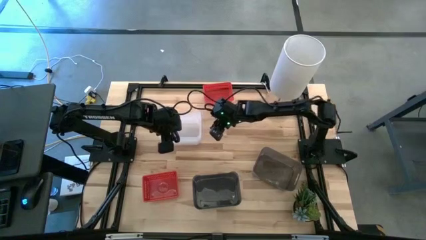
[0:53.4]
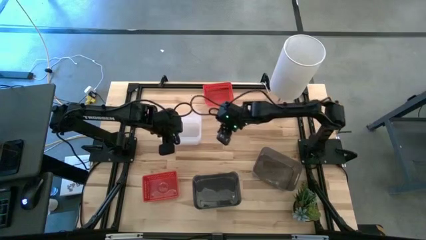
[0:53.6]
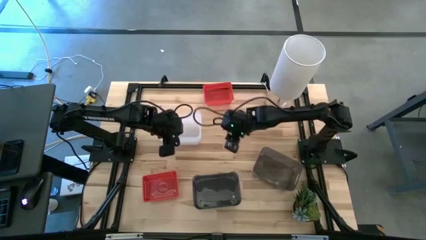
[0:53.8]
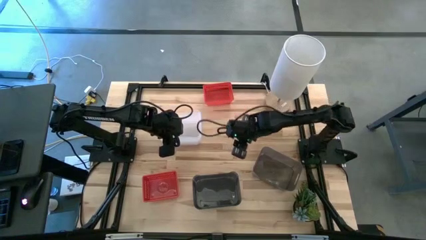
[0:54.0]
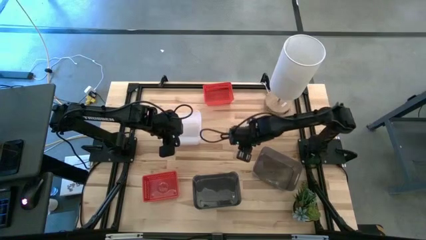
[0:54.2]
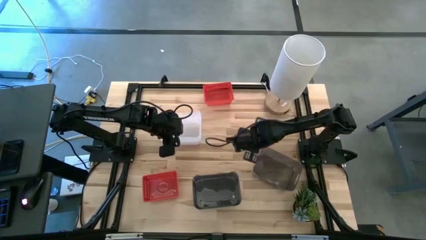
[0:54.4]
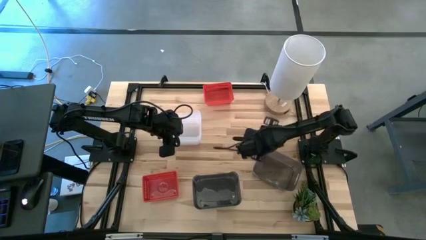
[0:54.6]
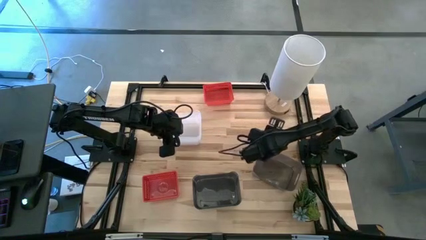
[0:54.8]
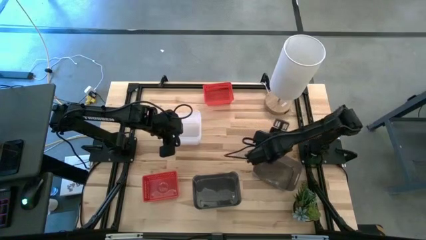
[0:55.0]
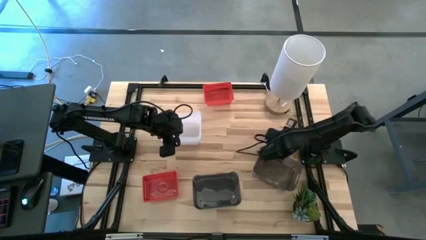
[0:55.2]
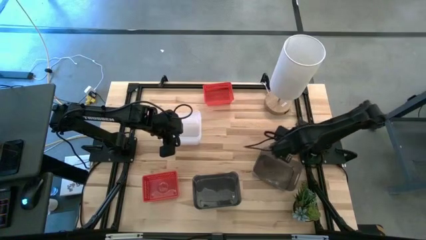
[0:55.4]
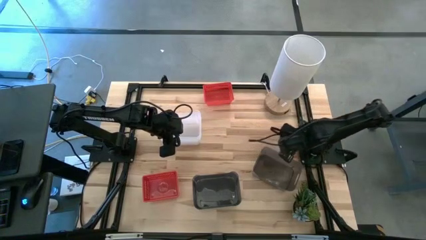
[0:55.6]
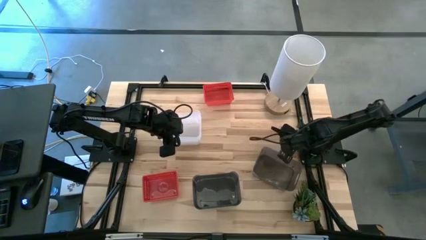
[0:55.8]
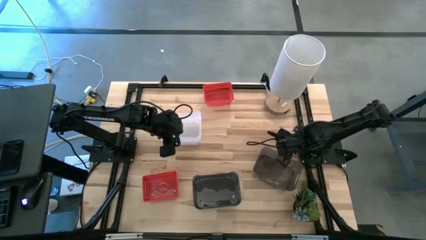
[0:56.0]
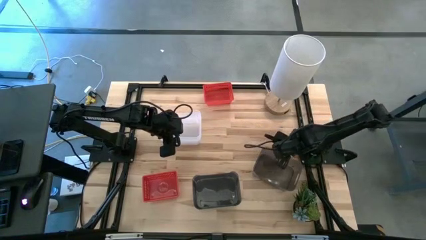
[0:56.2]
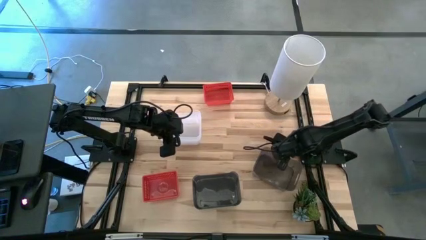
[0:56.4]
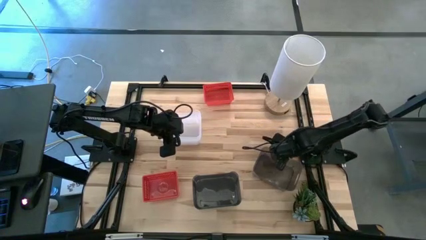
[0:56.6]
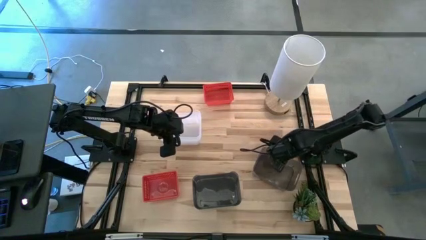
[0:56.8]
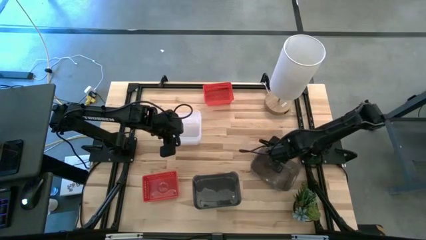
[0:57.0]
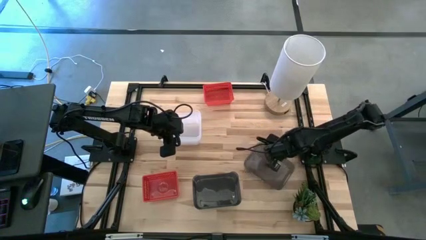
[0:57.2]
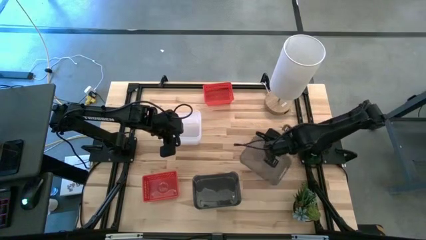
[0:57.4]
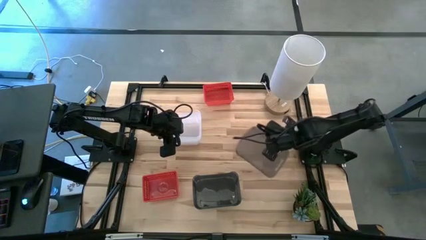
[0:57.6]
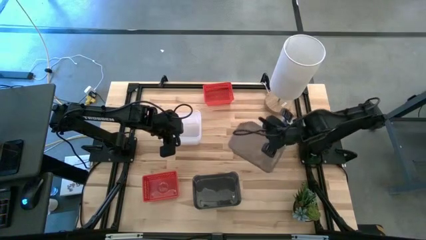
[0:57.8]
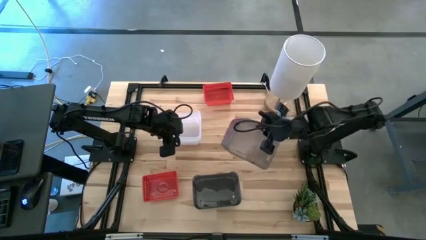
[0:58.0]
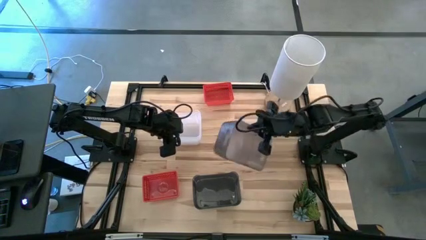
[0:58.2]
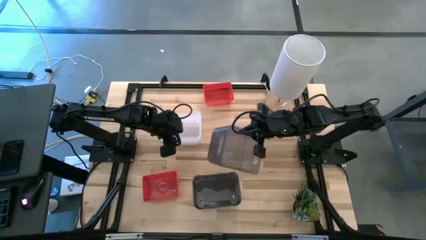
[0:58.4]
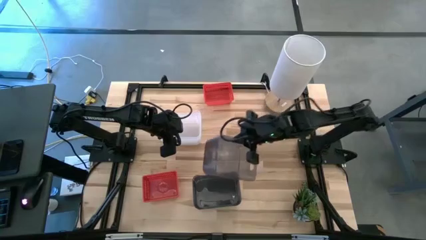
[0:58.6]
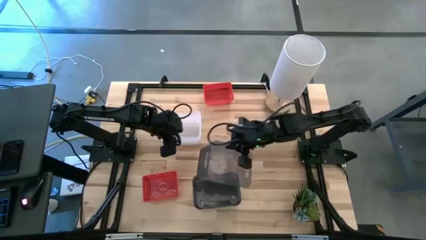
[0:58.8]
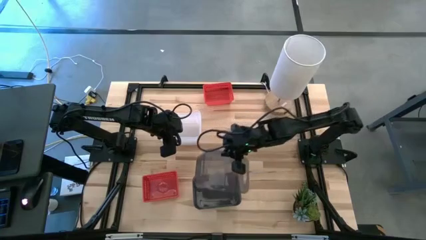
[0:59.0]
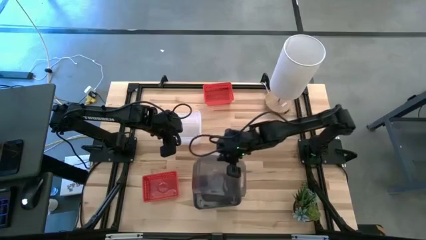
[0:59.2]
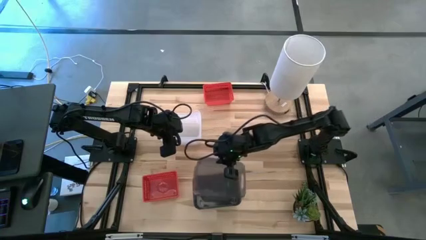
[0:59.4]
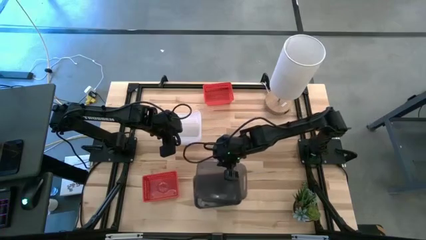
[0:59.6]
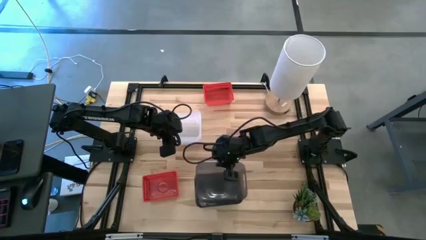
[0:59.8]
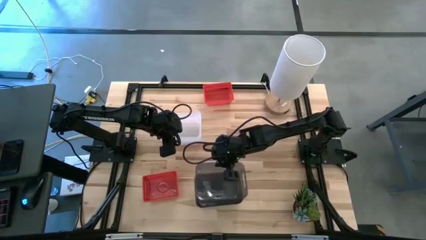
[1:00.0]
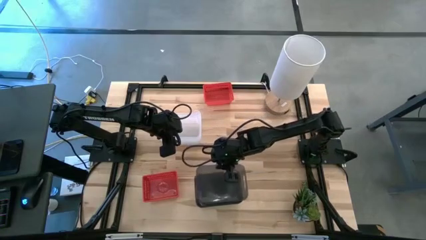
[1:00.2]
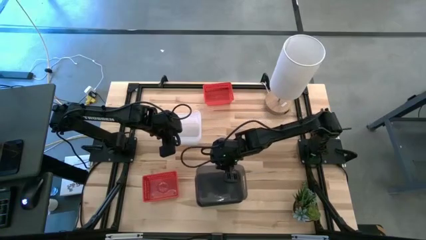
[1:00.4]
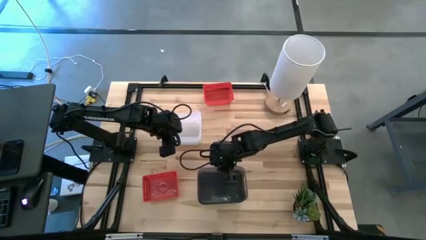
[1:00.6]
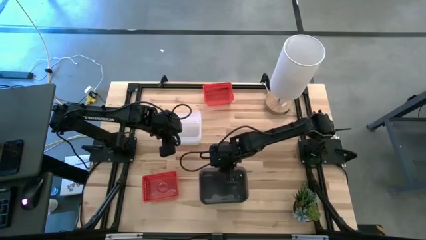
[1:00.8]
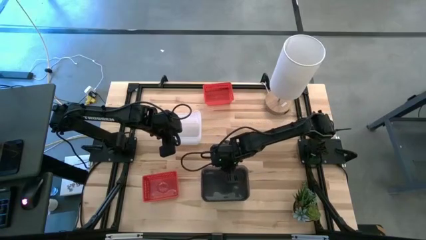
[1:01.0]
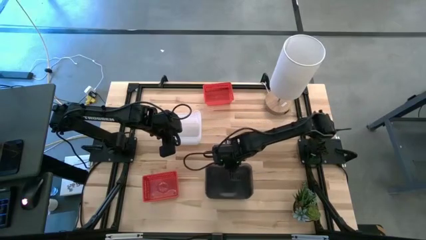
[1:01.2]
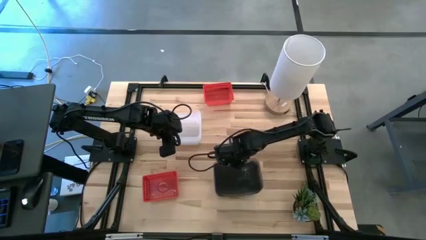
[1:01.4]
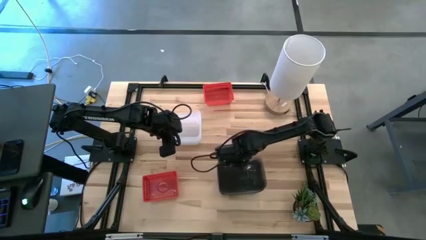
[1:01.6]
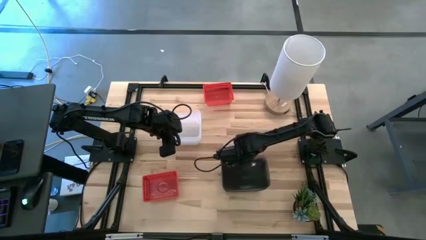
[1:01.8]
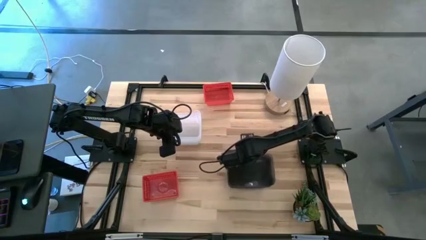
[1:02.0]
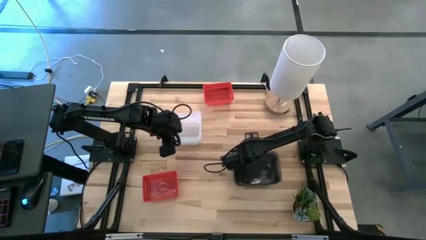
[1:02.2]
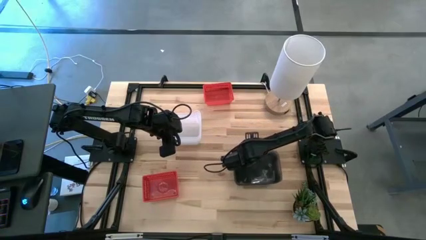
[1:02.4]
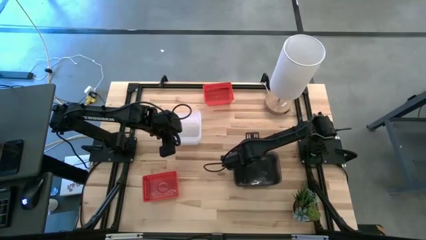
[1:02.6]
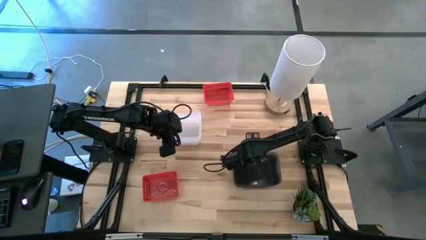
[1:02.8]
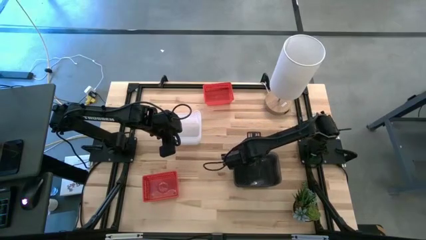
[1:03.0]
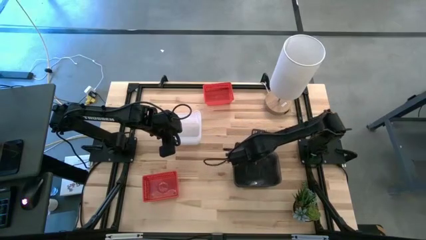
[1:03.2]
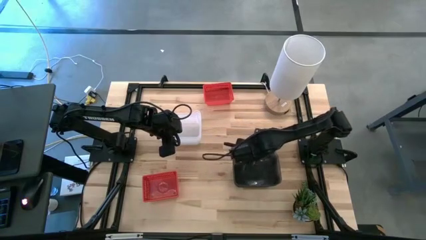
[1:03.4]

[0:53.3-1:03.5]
Stack the right black transparent bin on the black transparent bin

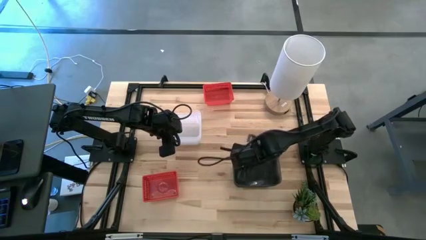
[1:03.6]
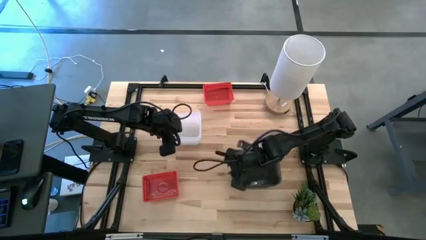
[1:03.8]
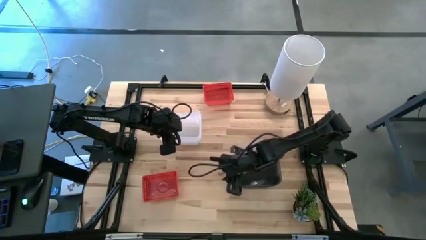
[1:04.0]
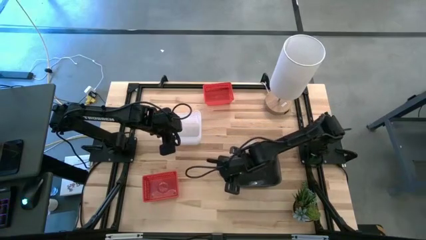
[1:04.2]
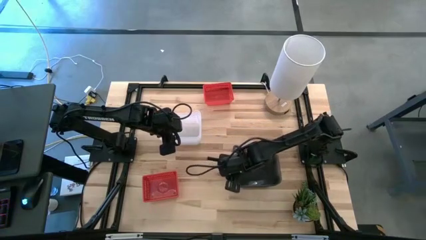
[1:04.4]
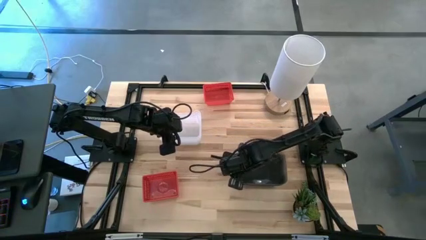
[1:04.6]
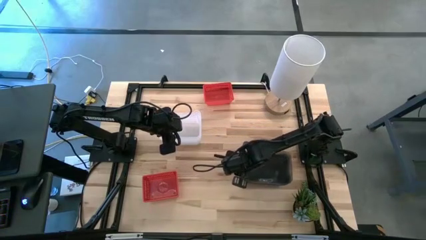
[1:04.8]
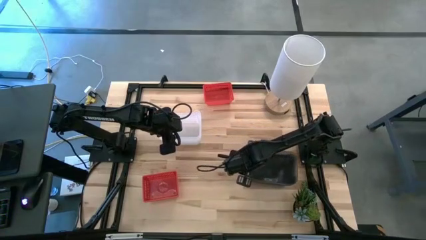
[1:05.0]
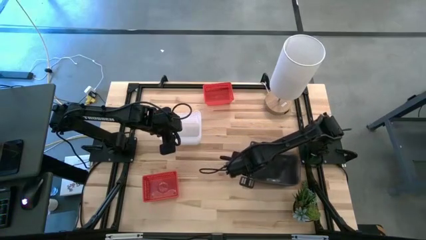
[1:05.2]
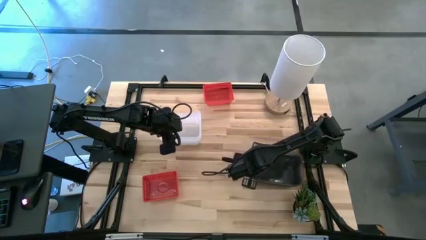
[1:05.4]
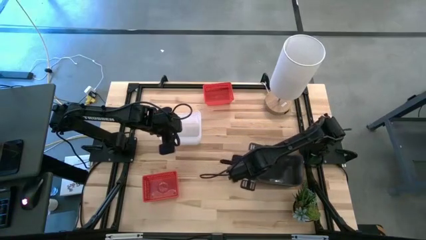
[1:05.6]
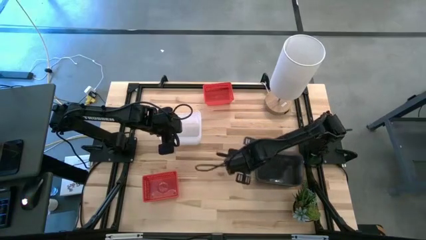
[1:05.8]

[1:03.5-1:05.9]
Move the black transparent bins to the middle right of the table
